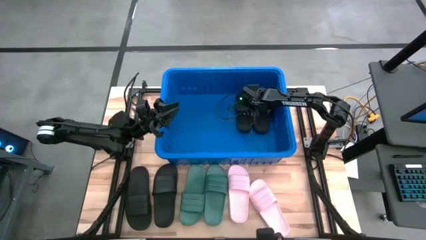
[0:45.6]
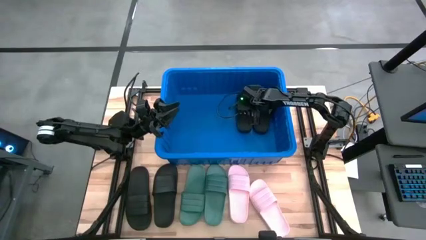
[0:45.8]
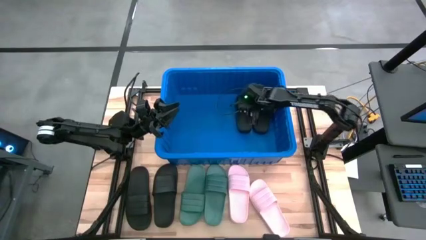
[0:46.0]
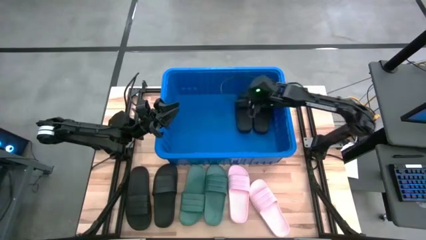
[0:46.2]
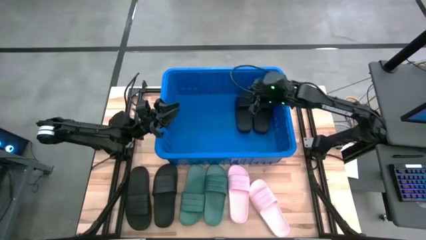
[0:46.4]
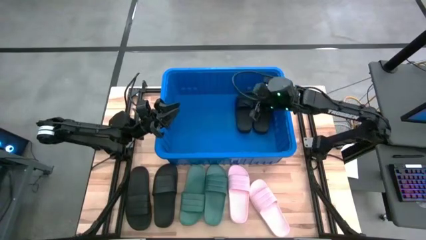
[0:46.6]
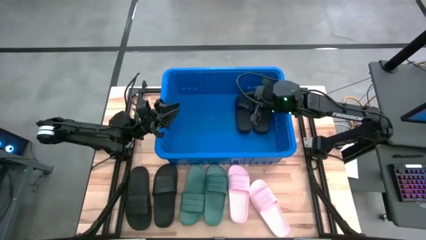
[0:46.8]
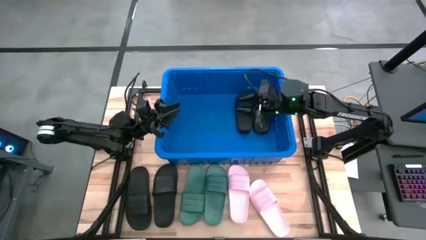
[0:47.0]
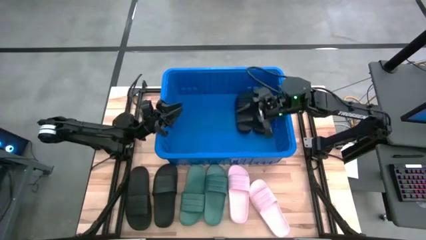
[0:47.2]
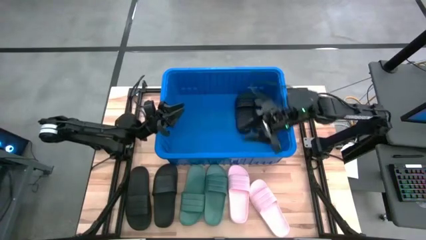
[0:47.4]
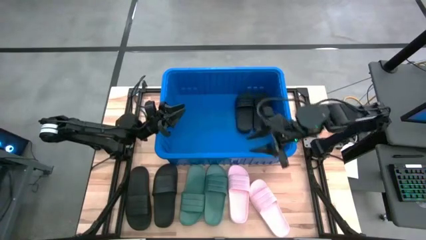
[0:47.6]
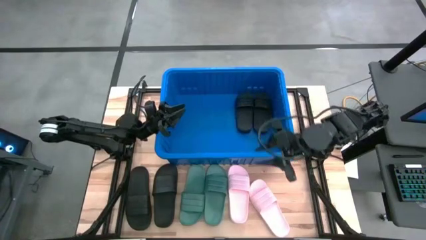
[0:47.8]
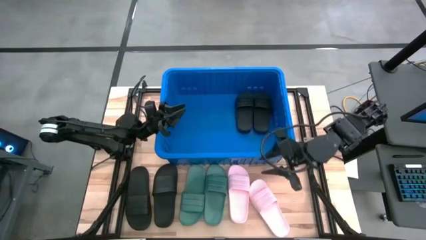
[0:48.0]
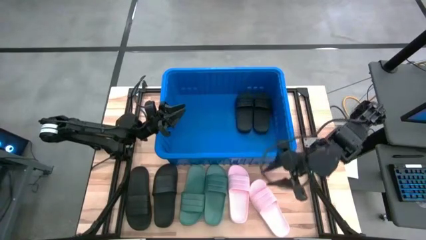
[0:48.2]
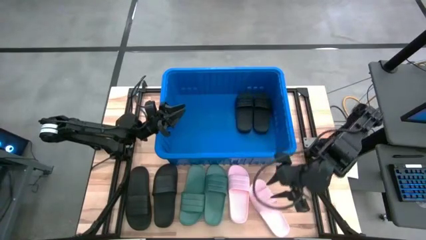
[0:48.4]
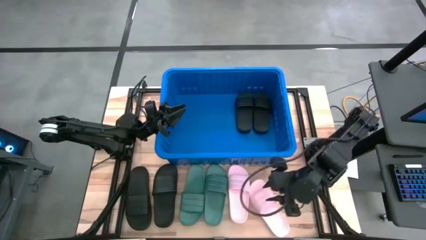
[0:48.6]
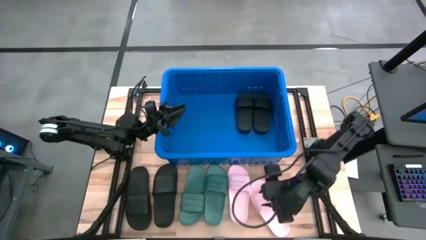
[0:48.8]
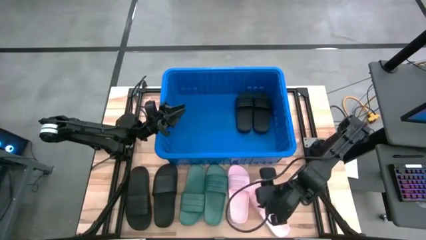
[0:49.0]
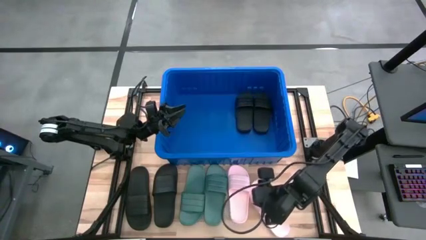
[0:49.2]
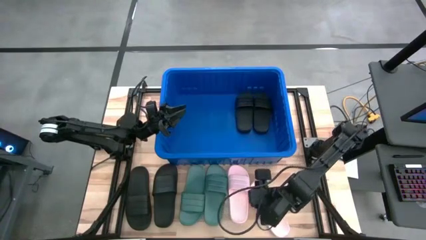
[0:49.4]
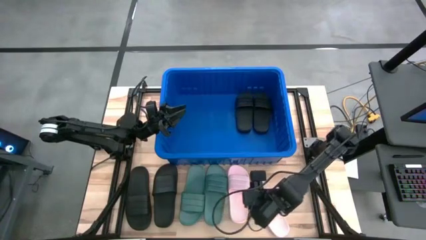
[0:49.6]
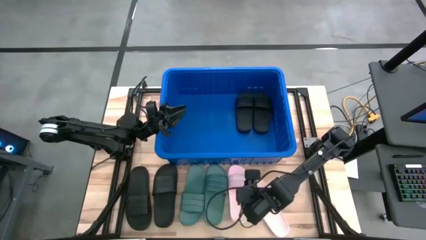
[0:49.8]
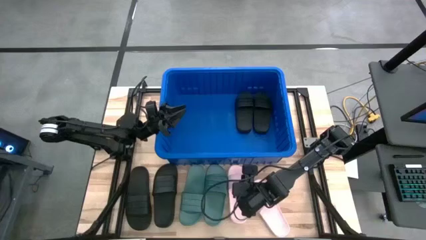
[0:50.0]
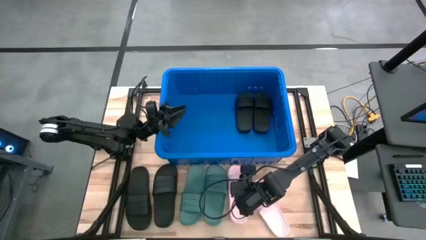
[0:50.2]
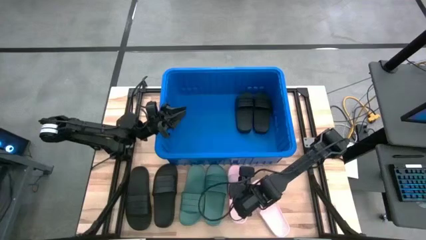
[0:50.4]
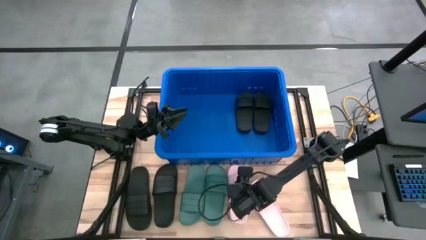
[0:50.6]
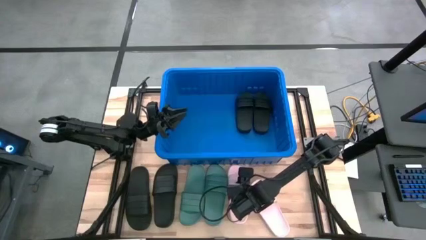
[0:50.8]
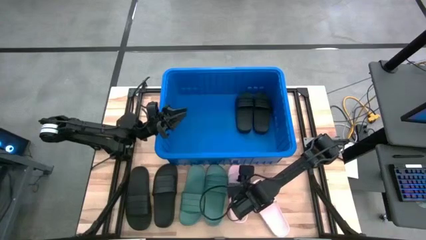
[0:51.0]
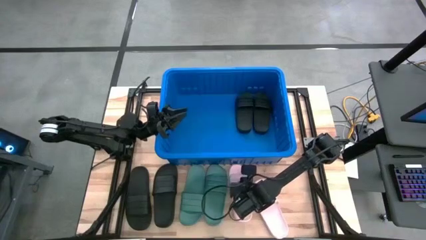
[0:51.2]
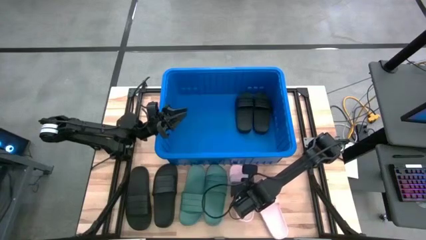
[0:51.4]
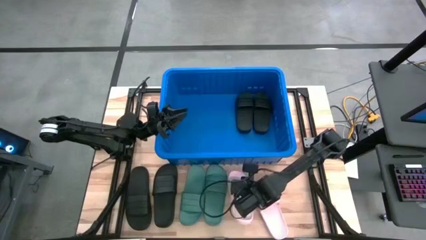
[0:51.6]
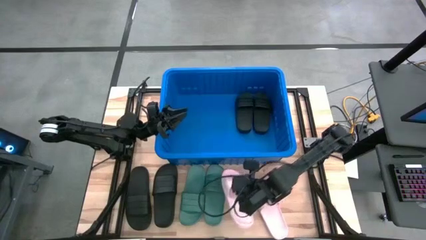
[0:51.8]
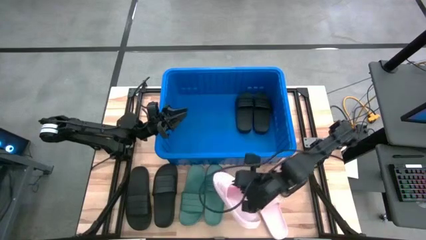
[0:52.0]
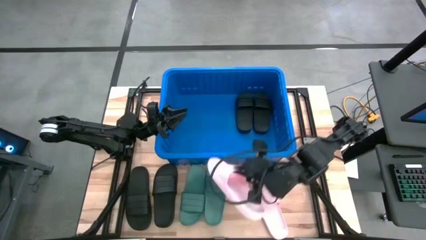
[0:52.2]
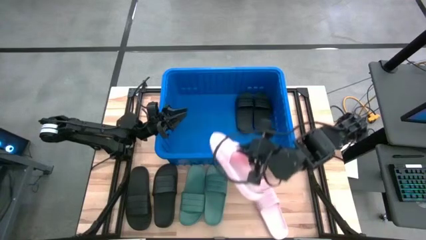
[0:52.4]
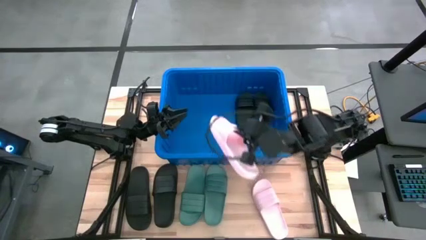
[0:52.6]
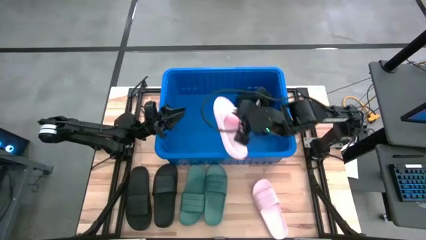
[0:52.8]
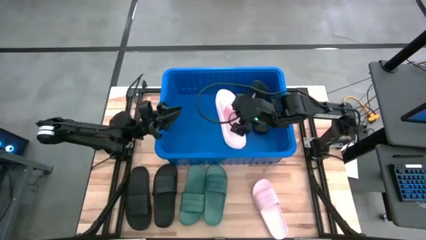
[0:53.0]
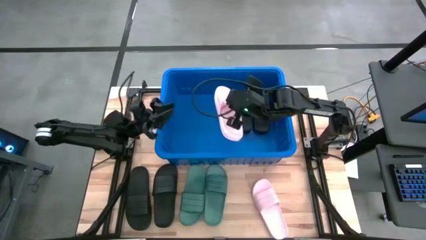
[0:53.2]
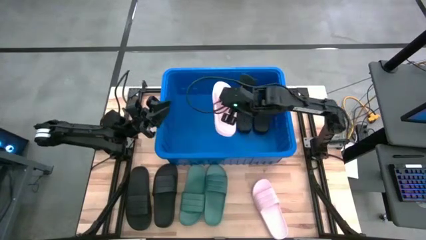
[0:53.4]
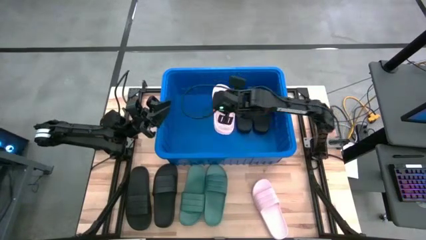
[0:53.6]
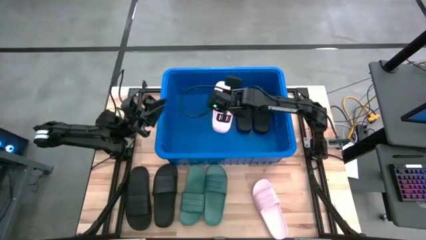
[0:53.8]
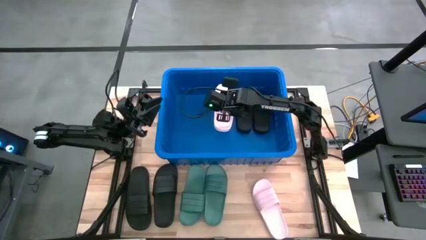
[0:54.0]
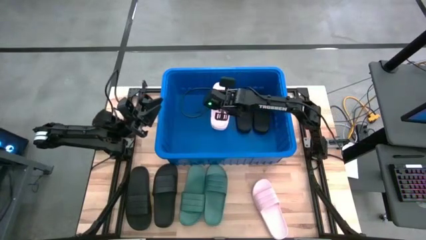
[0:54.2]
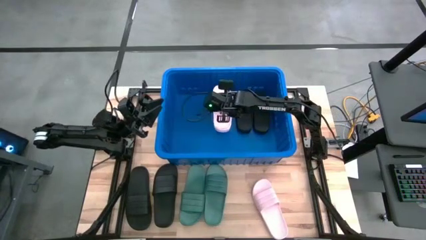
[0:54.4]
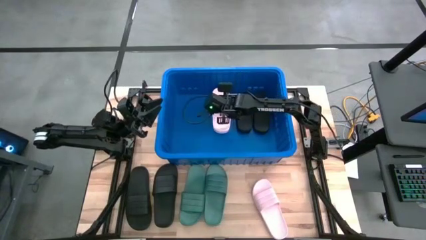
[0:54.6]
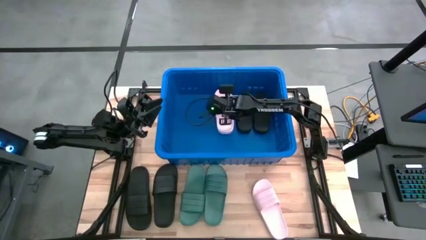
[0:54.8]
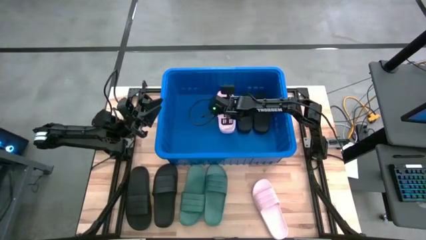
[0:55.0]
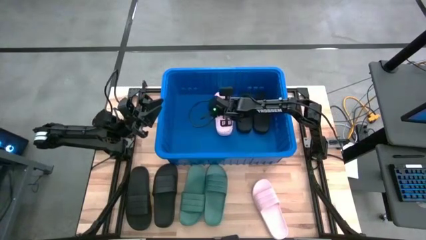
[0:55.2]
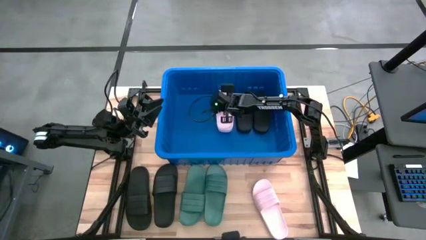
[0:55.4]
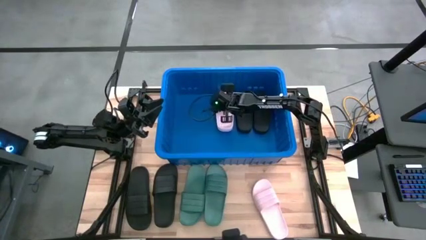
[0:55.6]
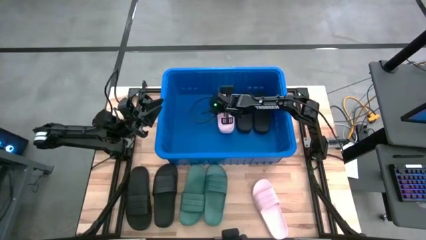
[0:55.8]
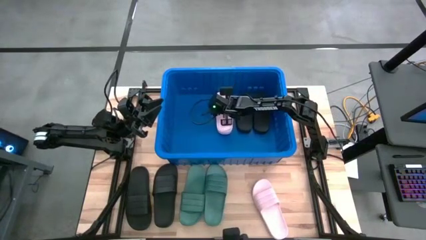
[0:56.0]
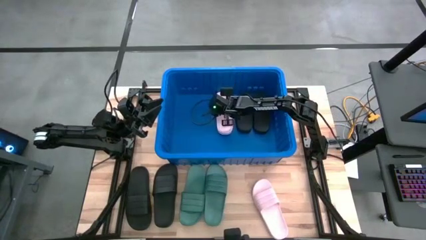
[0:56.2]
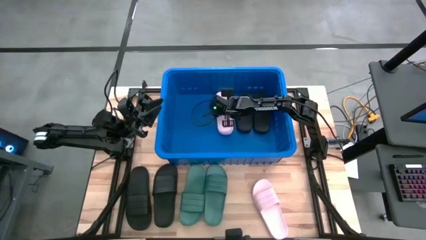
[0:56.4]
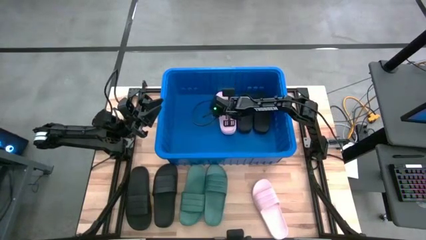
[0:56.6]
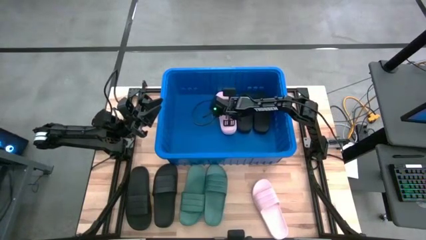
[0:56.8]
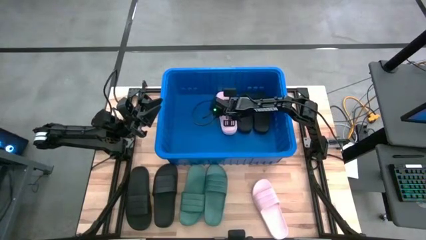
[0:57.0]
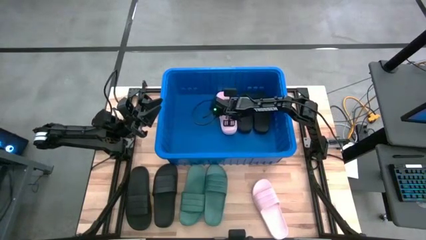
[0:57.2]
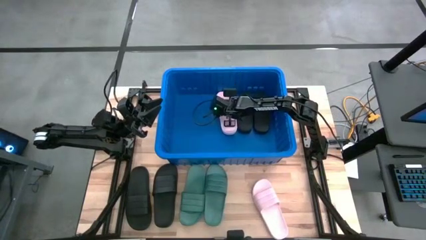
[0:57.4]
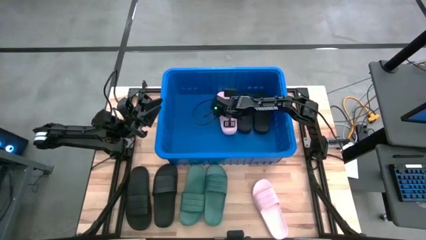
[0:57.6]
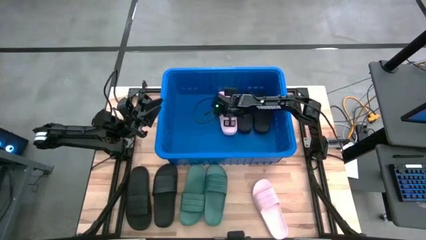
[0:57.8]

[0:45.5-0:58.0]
Task: Pick and place slides into bin
Put the left pink slipper into the blue bin
